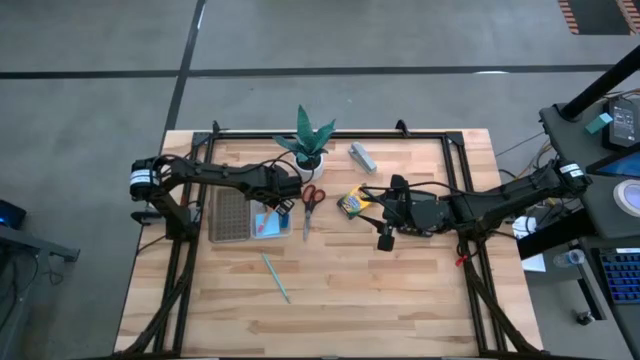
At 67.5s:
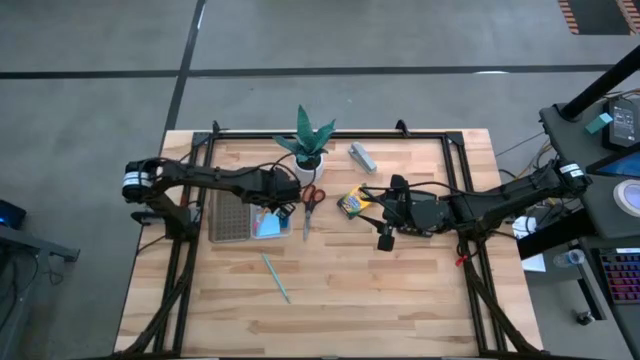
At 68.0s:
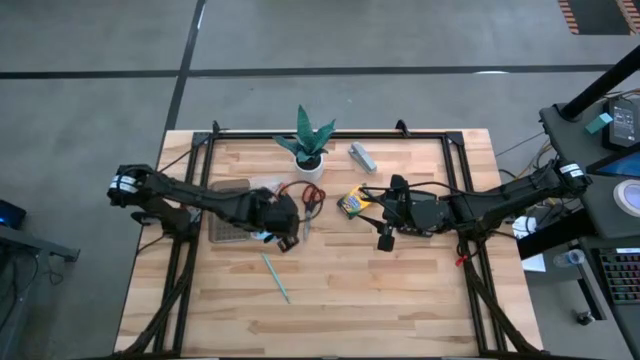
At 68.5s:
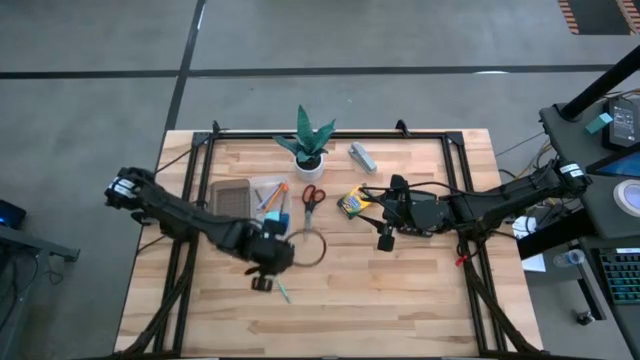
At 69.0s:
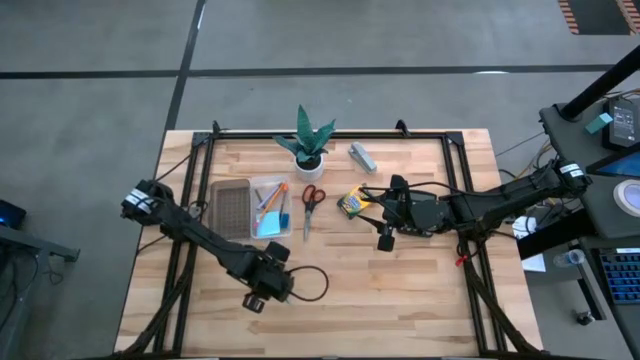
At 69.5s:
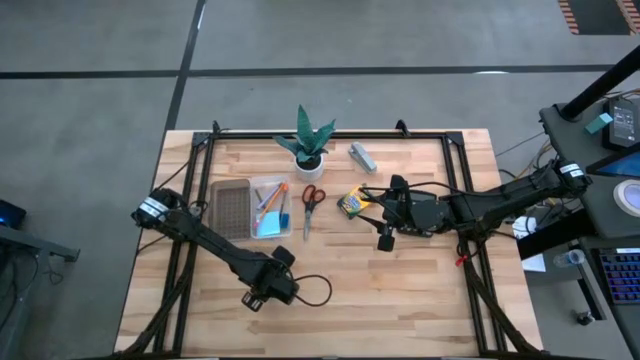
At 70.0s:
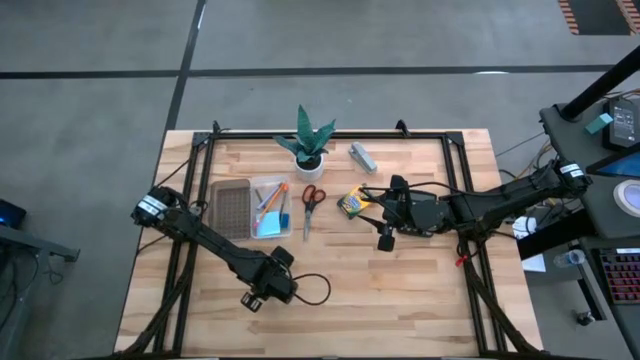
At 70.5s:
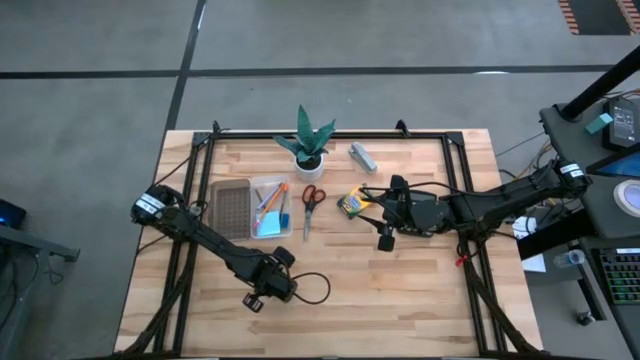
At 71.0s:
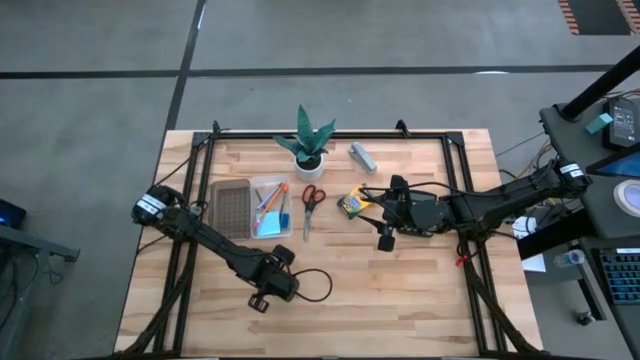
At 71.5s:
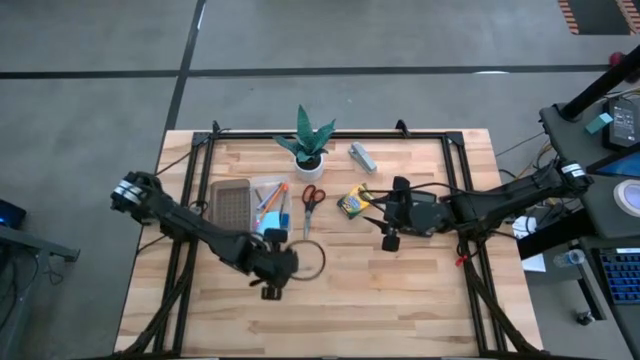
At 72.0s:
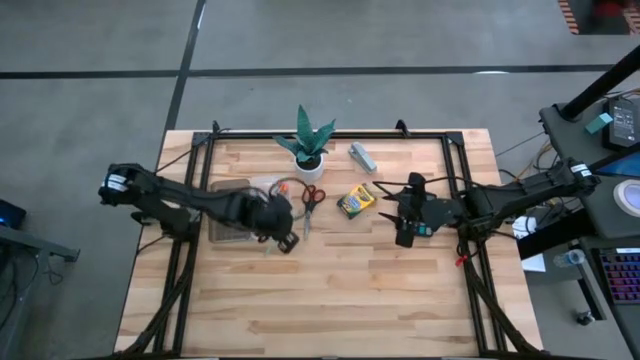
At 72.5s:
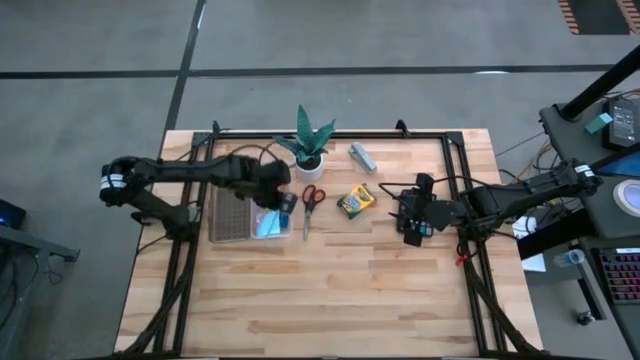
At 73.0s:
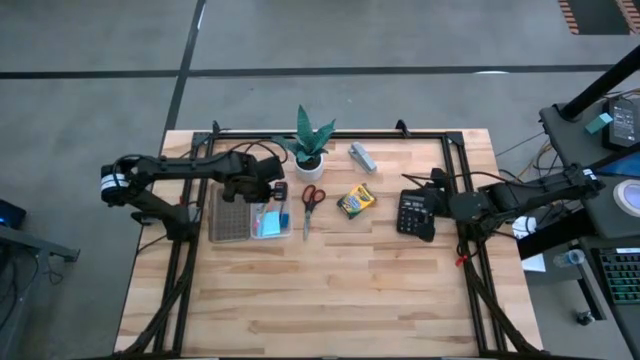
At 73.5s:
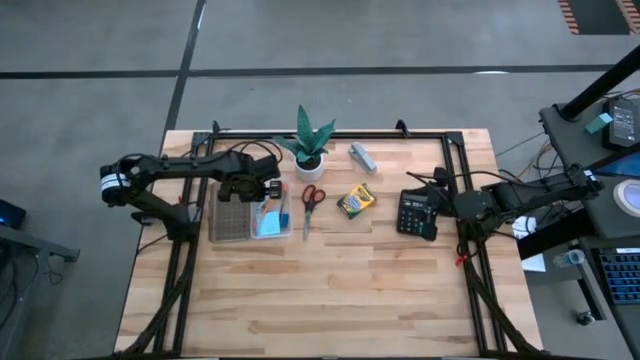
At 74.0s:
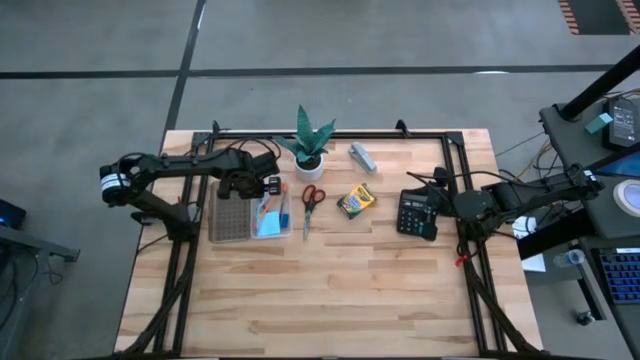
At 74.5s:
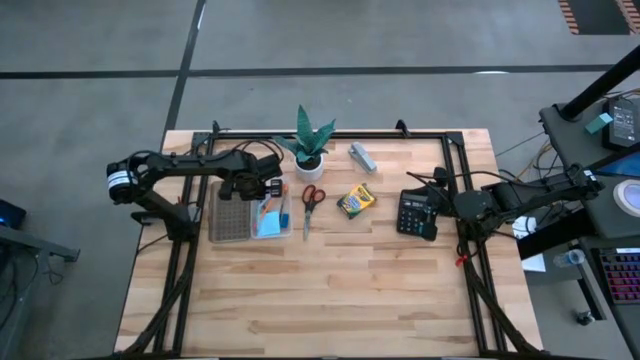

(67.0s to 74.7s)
Task: Pack school essentials
Put the light blue pencil into the white and black box

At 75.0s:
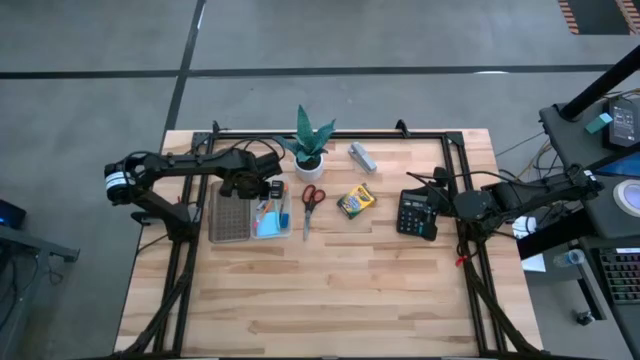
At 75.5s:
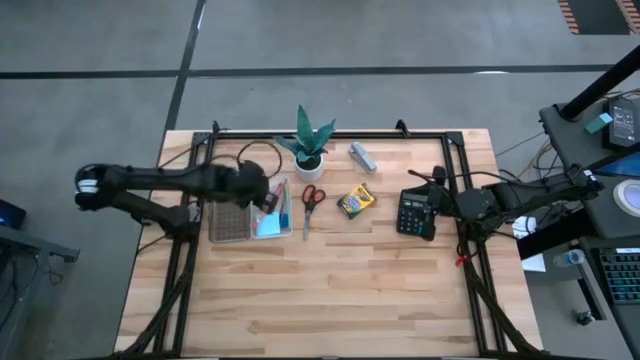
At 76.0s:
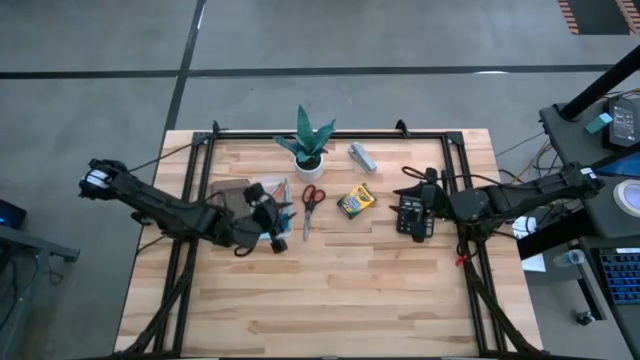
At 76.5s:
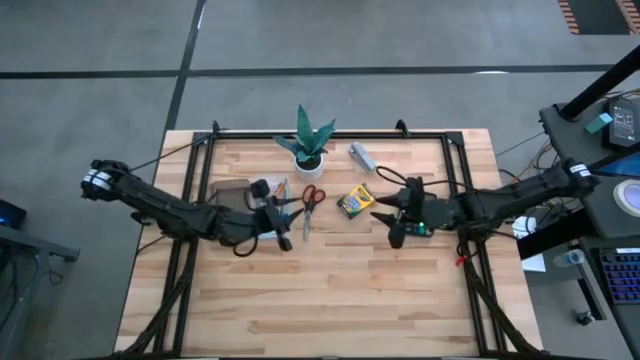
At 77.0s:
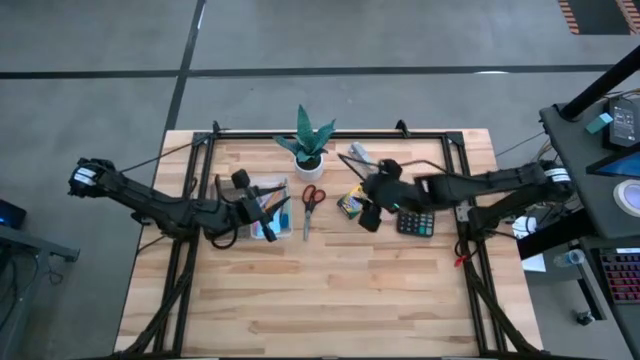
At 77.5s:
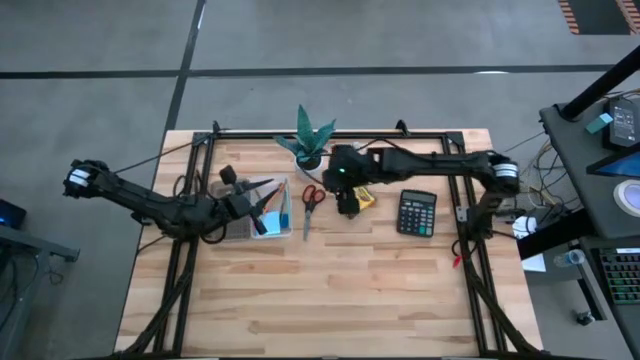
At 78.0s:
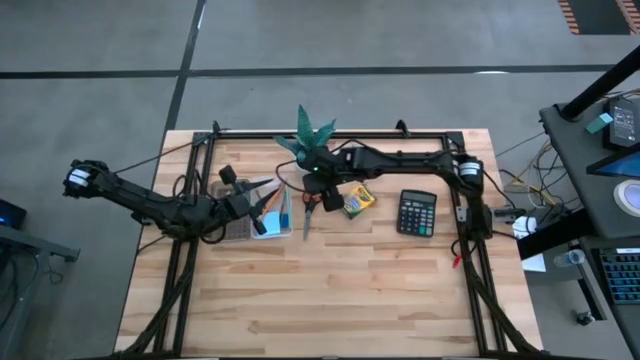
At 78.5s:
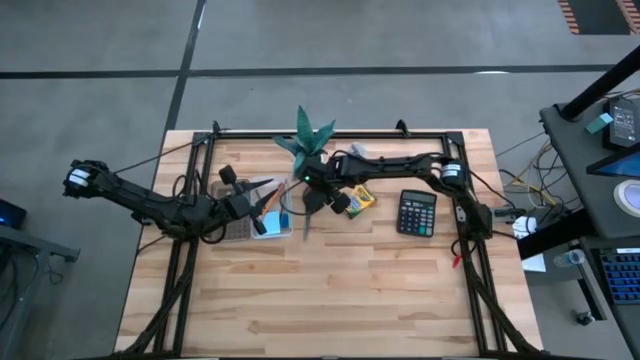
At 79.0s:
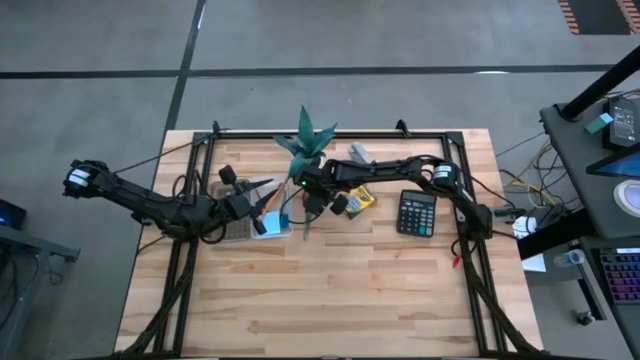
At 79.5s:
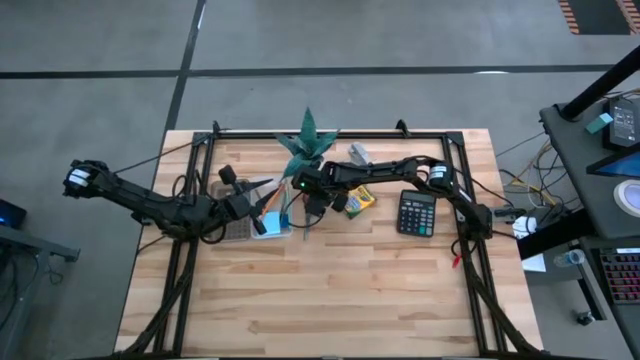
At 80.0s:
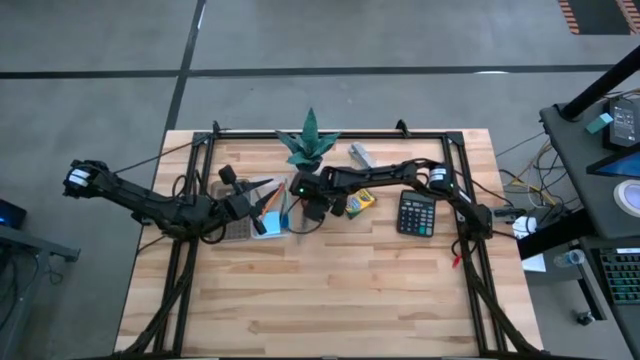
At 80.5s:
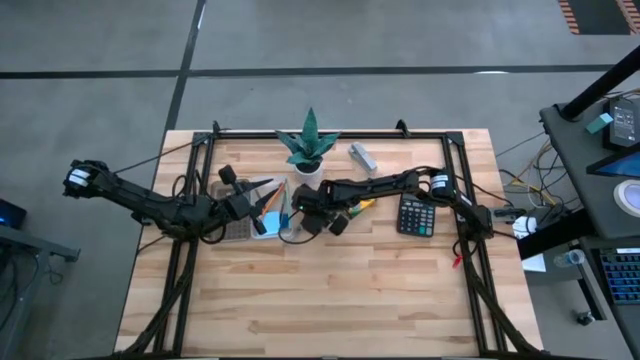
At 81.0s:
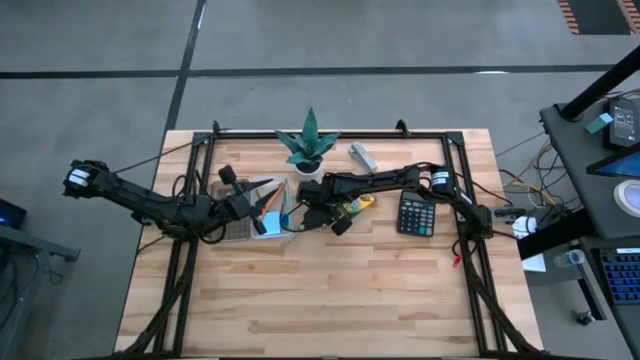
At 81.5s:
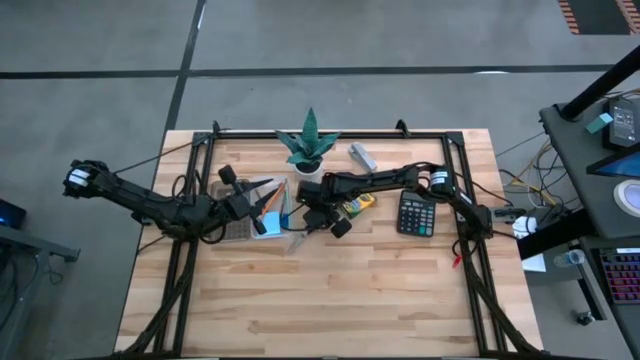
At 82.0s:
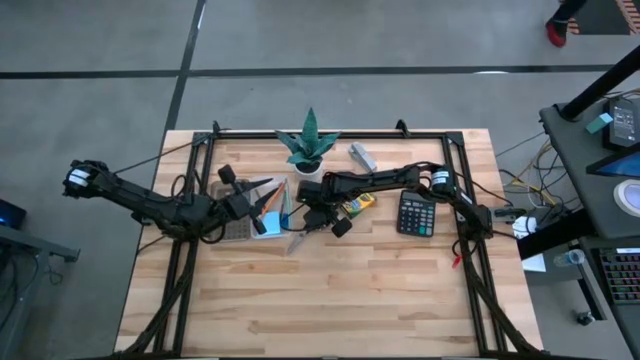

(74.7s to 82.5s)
Put the black scissors into the white and black box

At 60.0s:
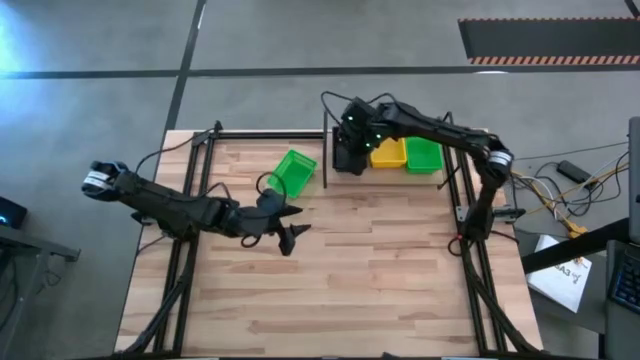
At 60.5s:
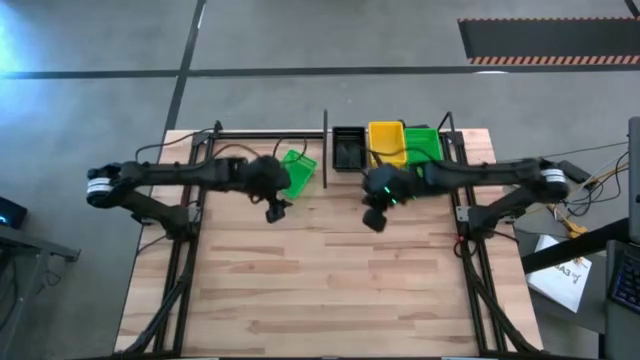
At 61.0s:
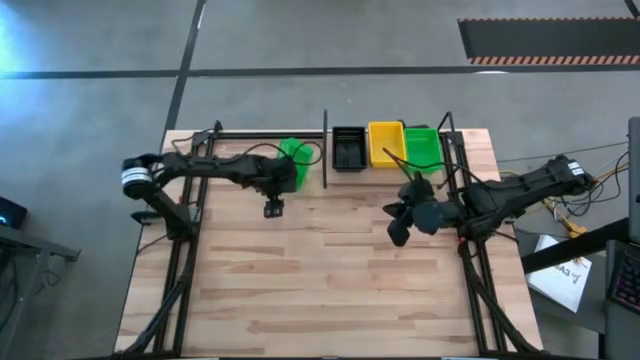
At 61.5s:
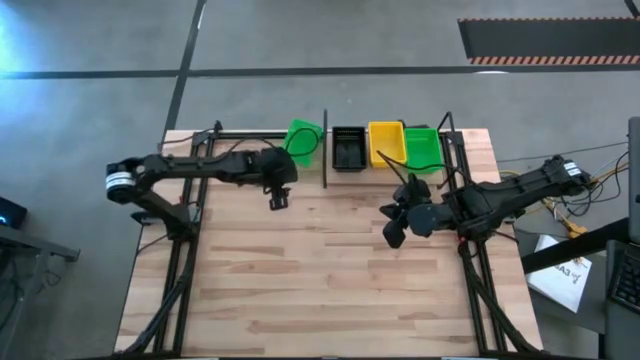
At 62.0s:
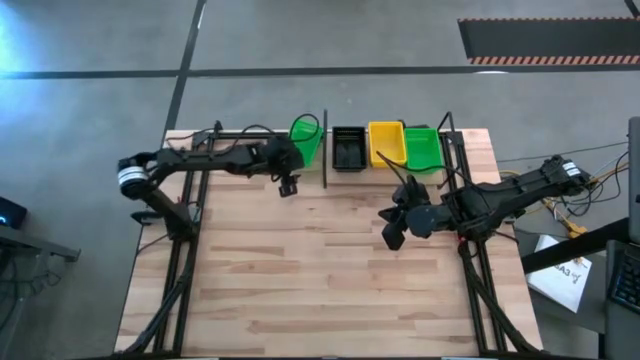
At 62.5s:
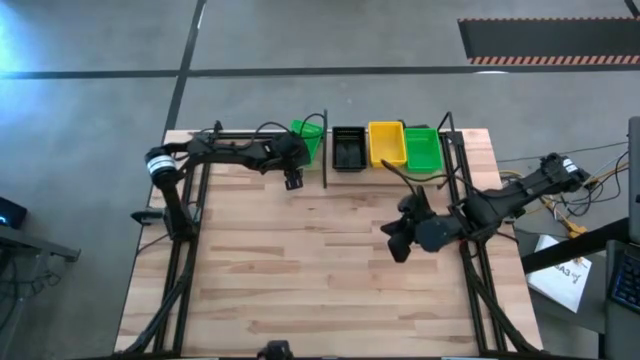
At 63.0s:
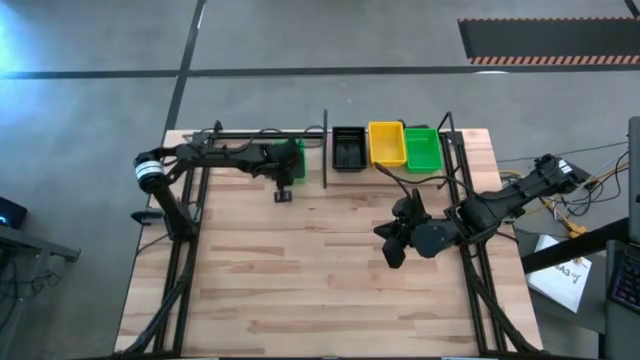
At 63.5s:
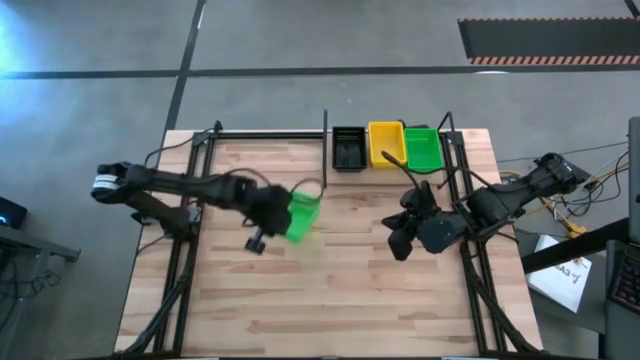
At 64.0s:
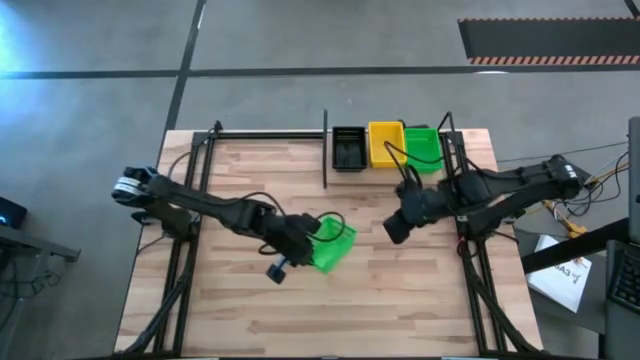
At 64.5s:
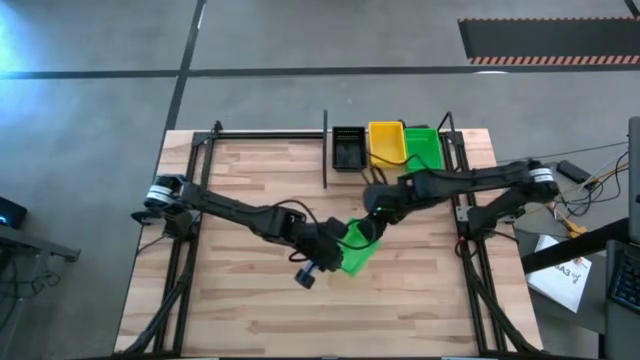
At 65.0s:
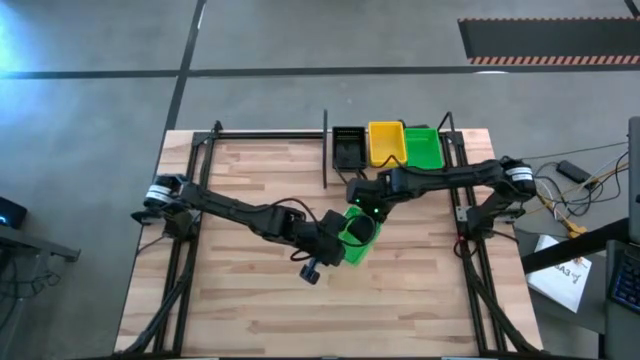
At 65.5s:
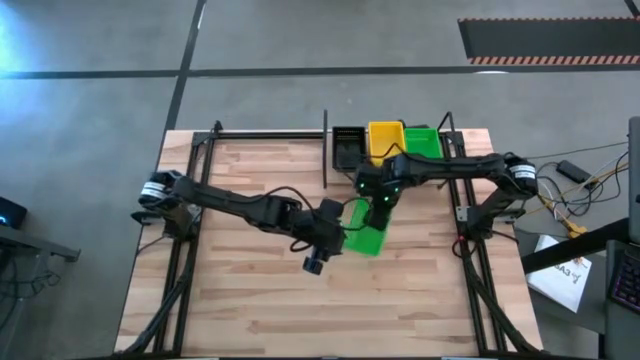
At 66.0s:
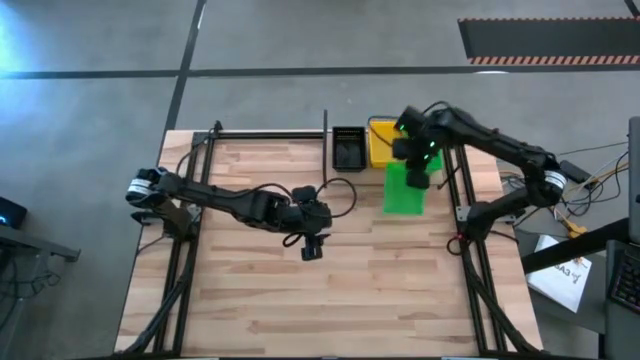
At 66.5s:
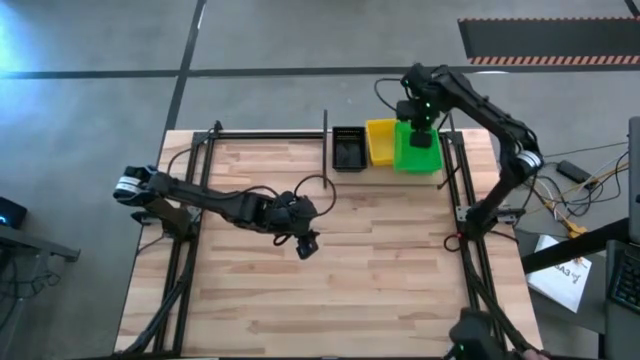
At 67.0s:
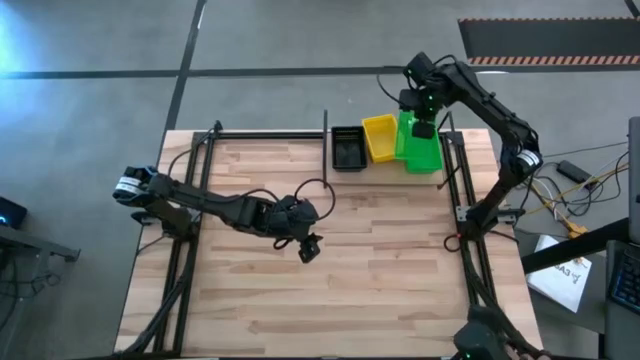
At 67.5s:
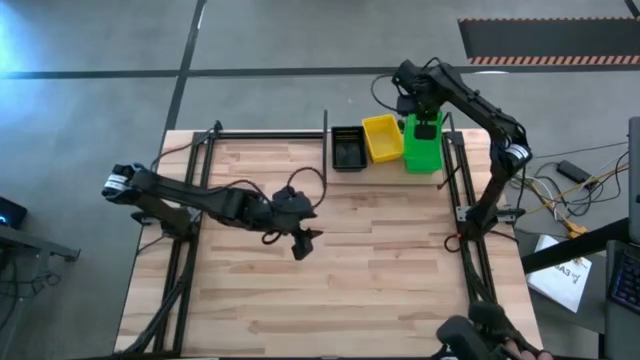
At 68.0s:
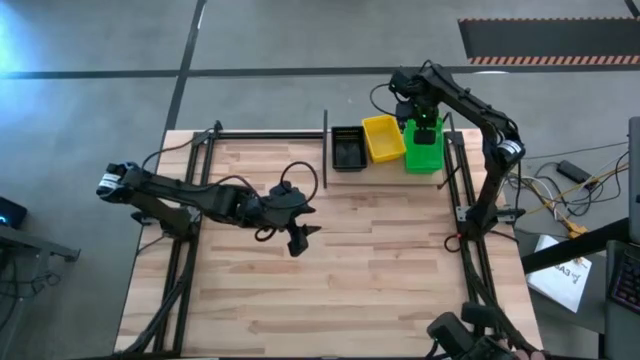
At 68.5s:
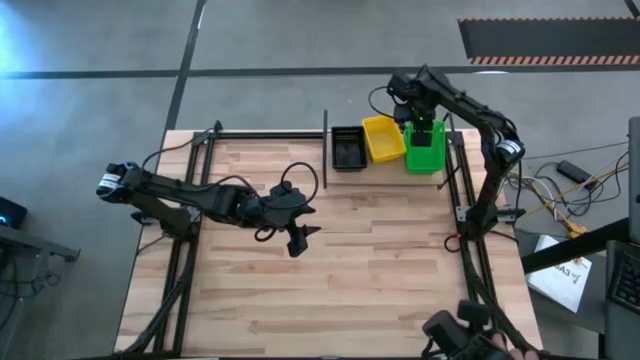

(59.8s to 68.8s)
Task: Stack baskets on shelf by color
Stack the green bin on top of the green bins on the shelf
